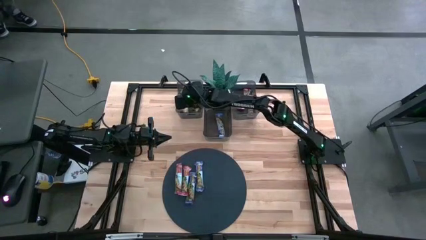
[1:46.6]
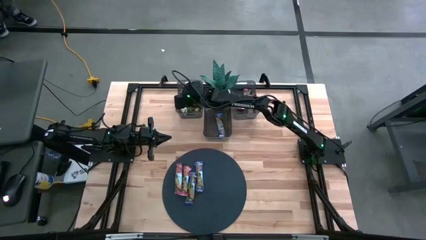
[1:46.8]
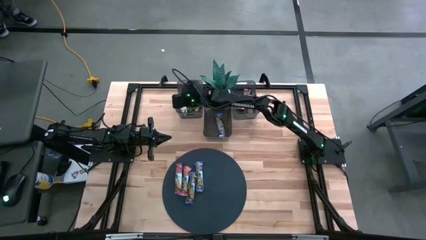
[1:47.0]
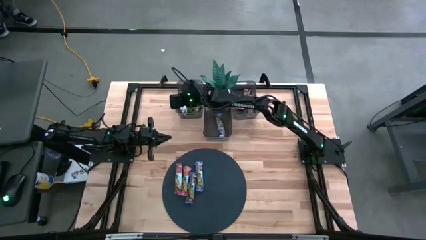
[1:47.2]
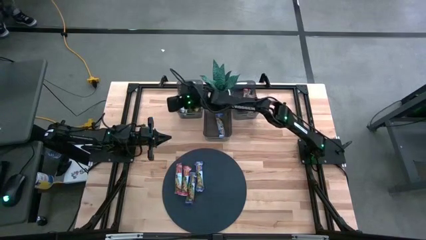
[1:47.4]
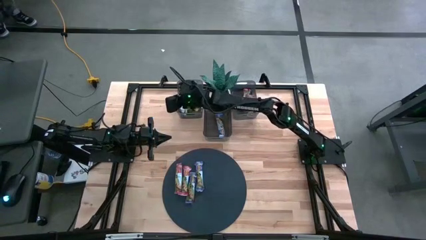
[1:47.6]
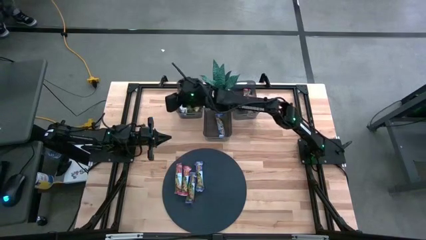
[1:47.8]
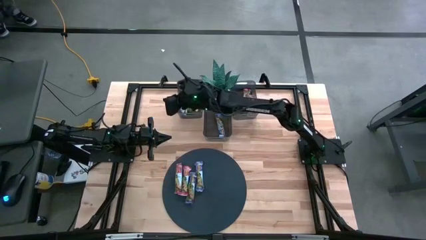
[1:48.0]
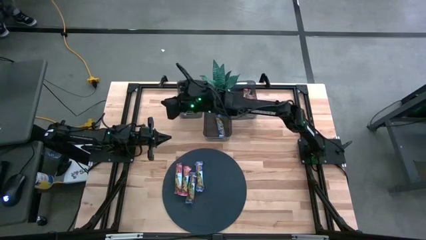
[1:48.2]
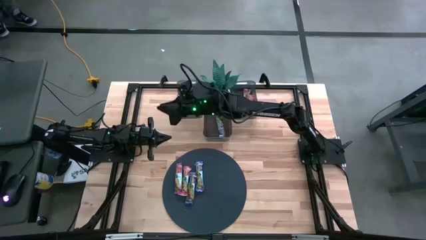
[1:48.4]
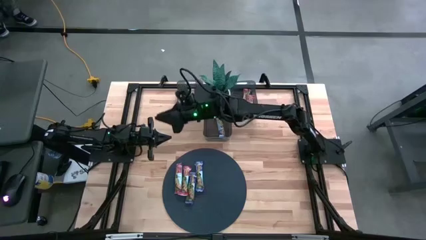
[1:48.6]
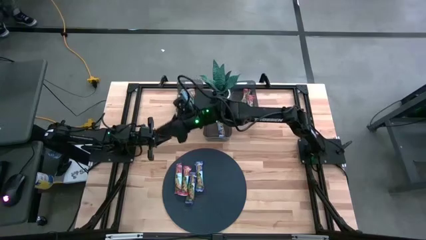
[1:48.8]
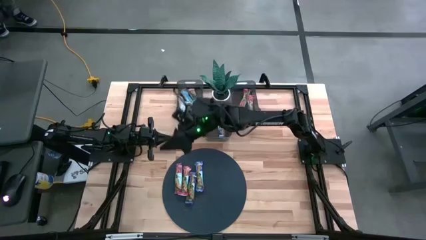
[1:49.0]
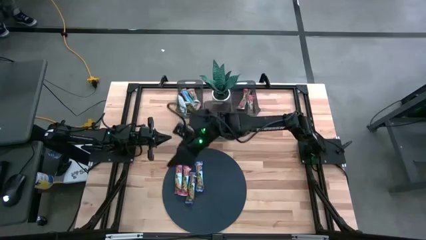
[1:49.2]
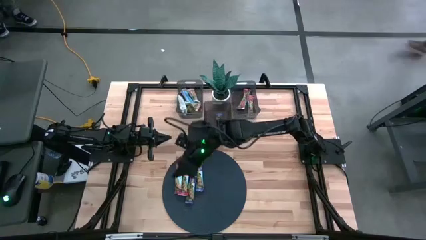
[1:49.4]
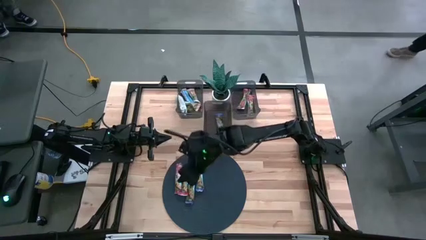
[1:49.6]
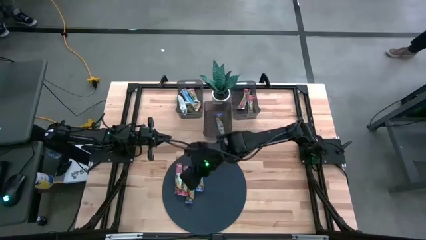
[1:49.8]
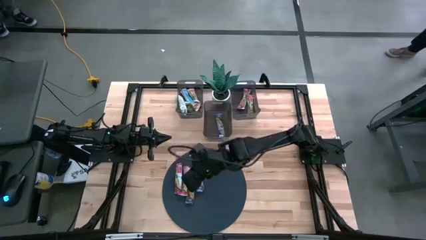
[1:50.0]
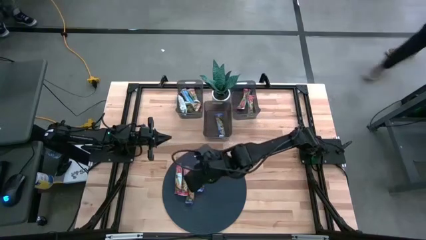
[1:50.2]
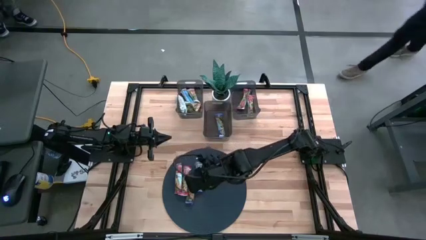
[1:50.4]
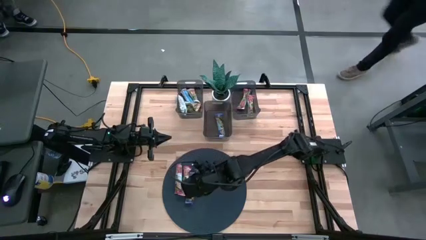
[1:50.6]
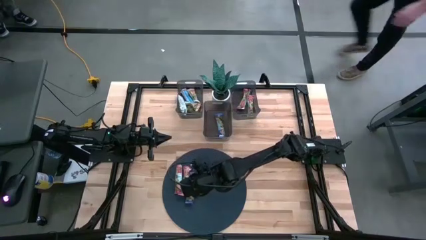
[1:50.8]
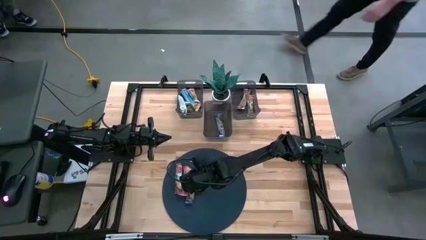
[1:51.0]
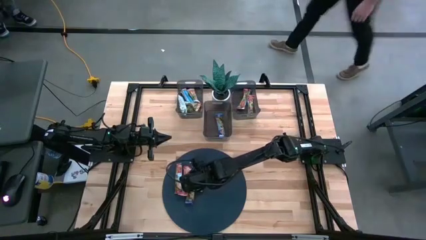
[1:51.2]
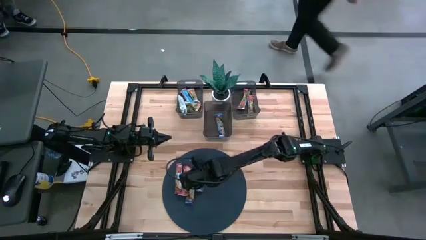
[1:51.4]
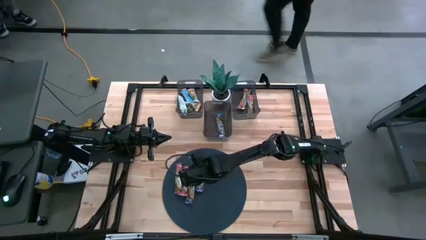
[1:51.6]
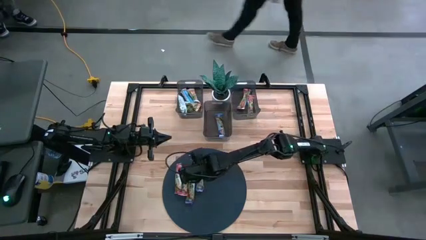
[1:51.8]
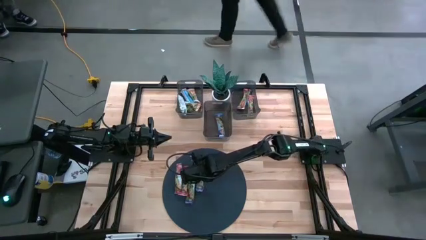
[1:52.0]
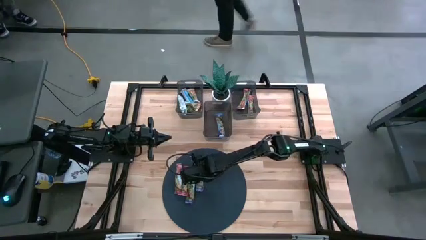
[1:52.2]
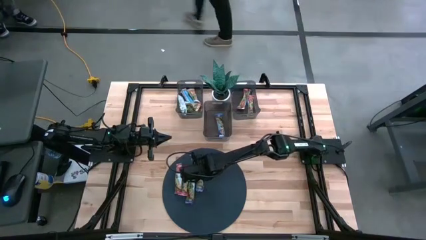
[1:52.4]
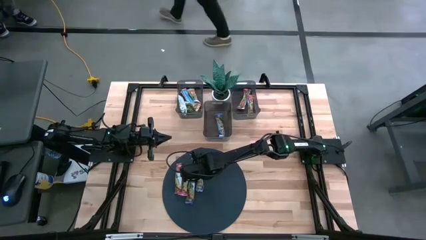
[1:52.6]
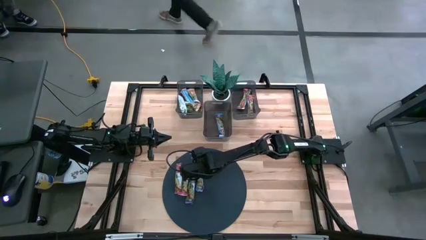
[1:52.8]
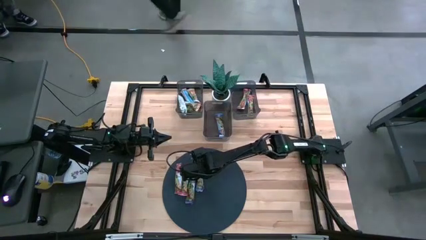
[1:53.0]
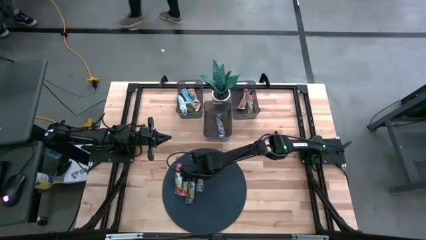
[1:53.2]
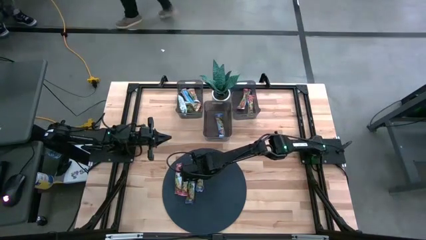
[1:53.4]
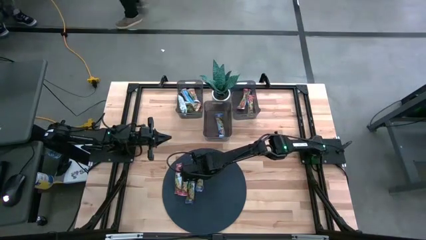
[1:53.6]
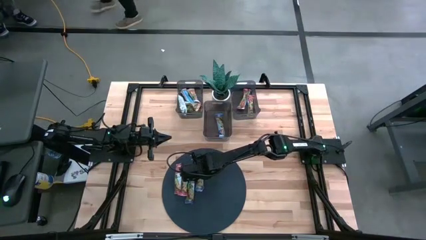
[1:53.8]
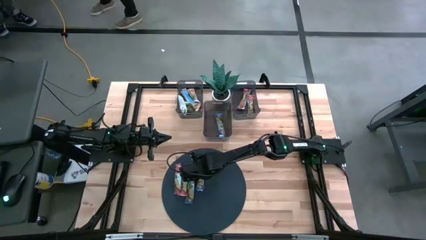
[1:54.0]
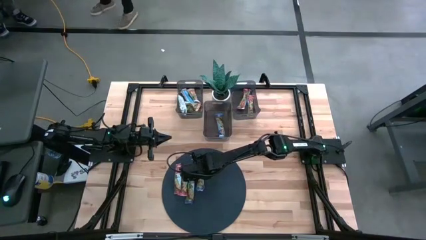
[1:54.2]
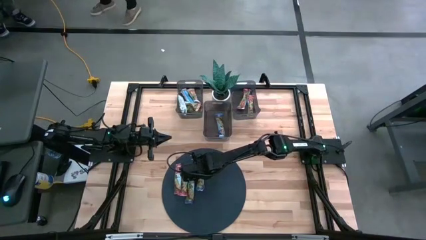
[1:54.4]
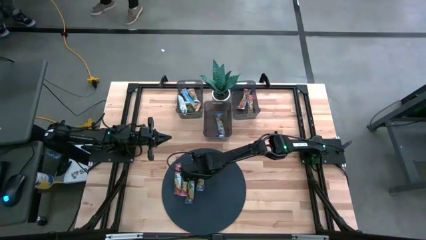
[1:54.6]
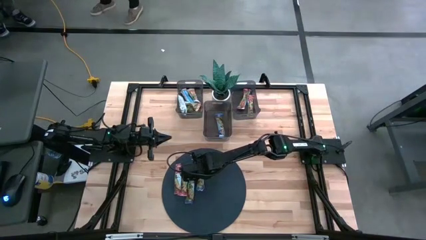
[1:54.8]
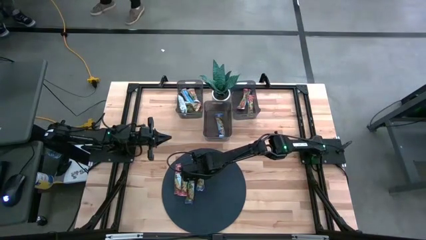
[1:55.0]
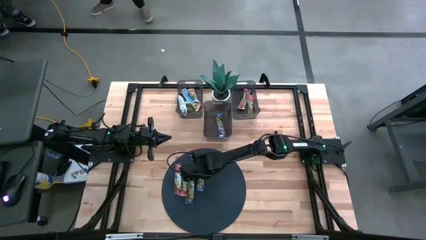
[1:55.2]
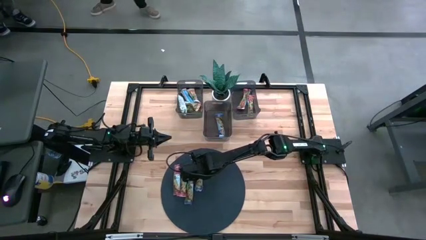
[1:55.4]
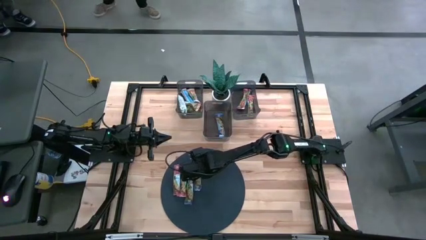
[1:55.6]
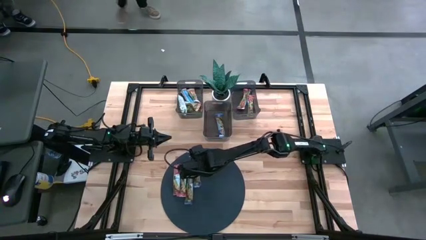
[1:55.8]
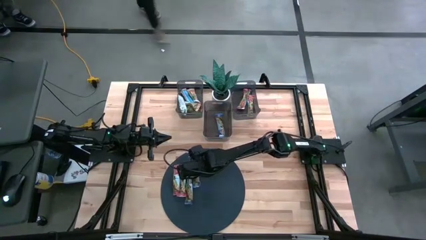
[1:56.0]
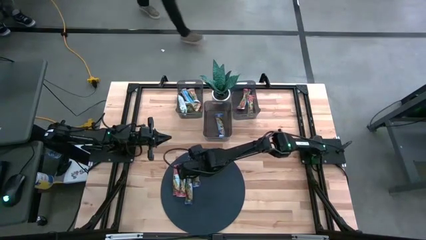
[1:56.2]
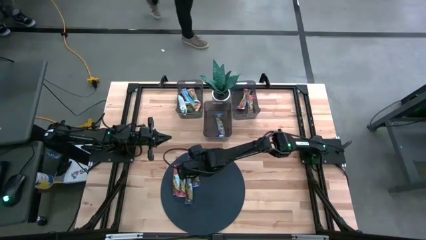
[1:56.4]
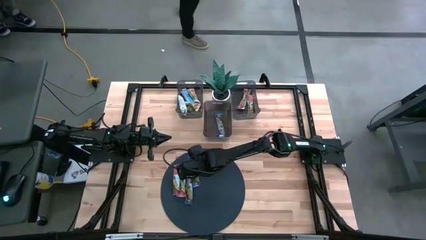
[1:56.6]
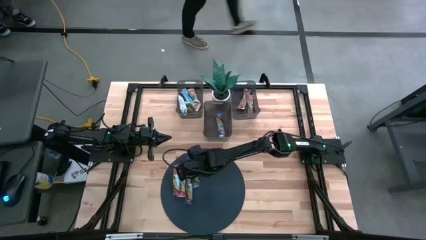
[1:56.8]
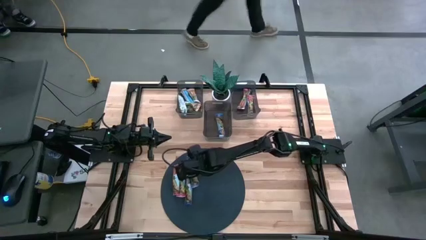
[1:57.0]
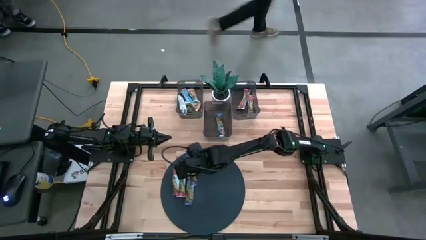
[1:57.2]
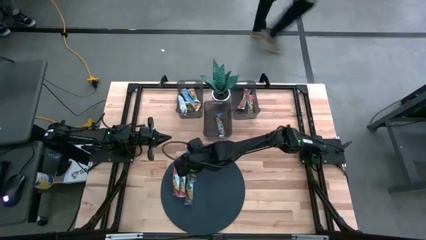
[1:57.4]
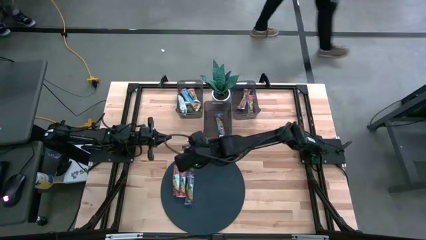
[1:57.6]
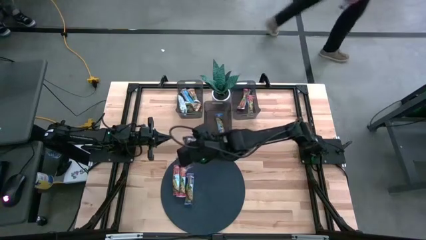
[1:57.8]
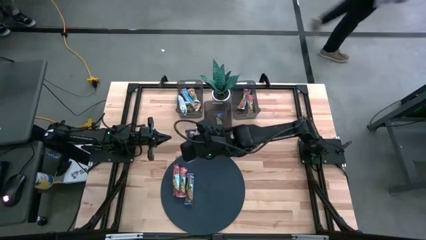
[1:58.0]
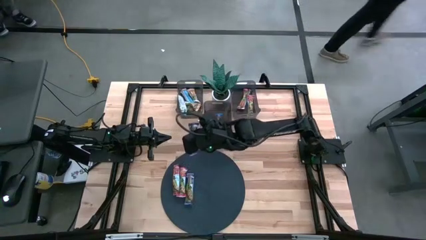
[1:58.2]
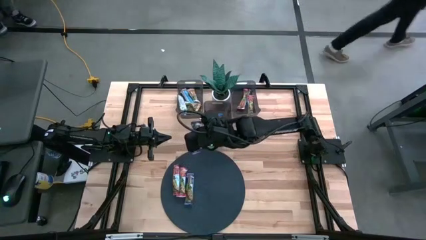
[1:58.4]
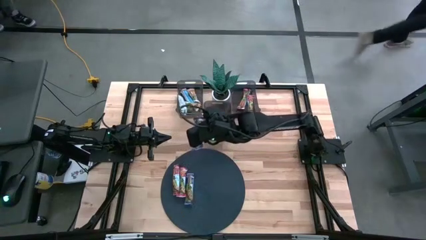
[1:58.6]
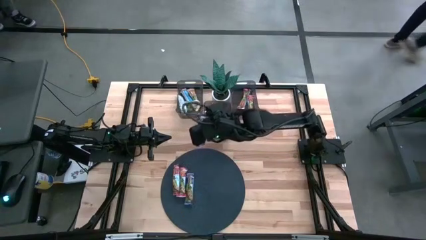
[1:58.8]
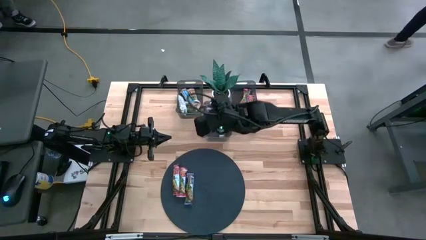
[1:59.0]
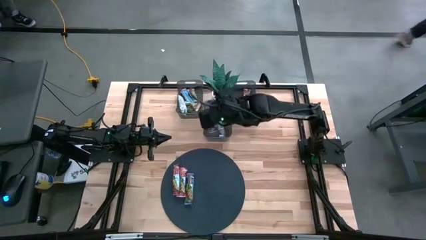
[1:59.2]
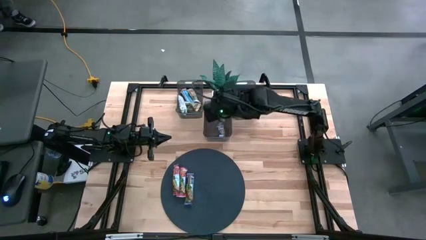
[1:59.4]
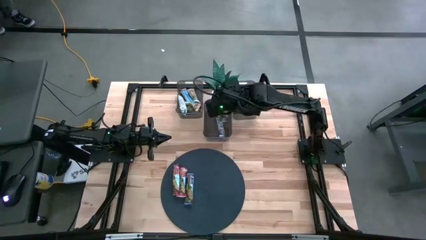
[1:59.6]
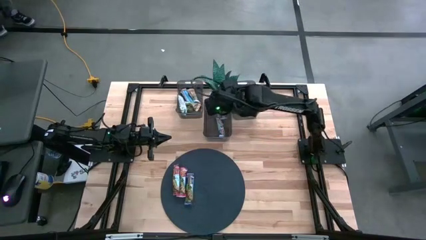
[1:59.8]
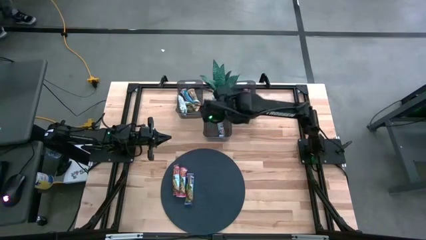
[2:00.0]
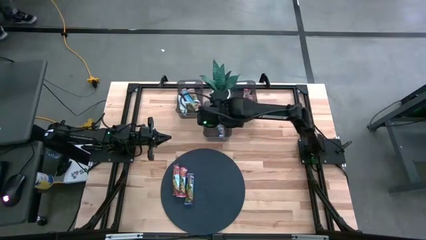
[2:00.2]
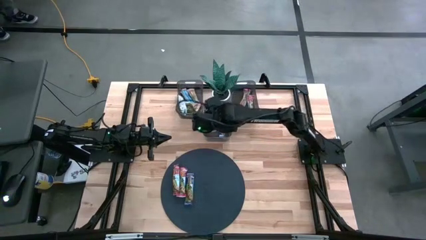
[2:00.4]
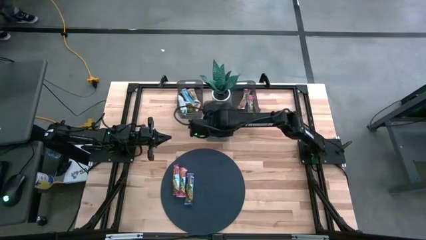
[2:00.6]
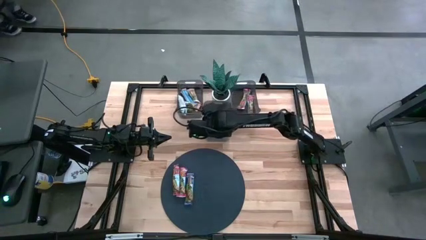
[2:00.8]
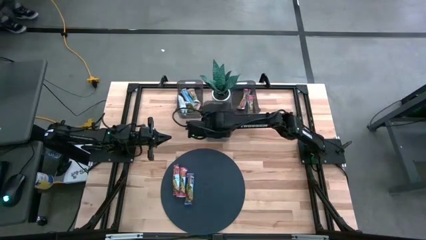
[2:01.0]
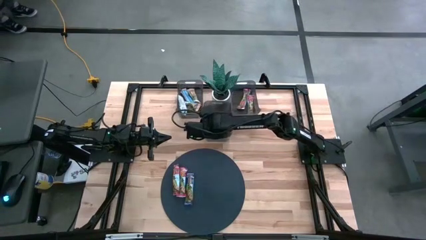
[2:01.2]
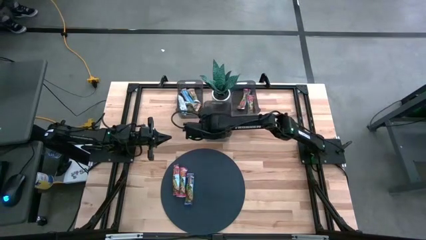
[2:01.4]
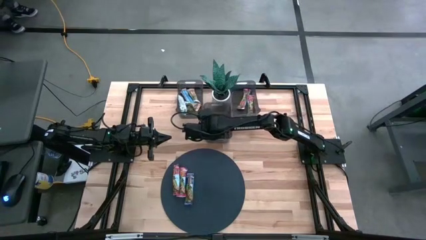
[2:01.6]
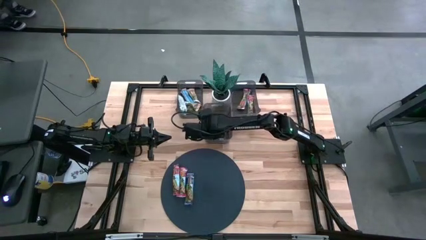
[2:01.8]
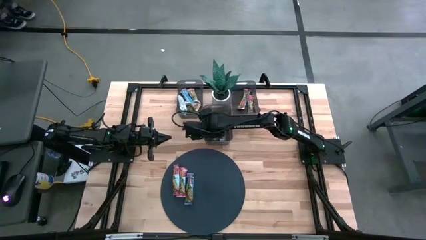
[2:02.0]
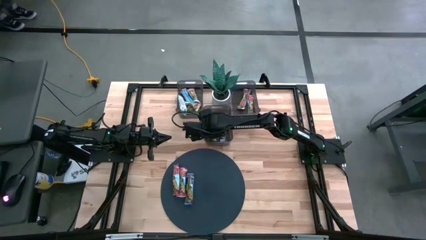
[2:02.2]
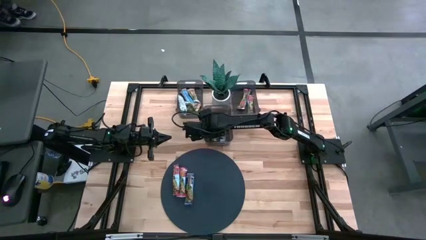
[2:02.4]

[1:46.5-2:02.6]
Task: Pick and place Granola Bars by type
Put the blue granola bar into the middle black bin
